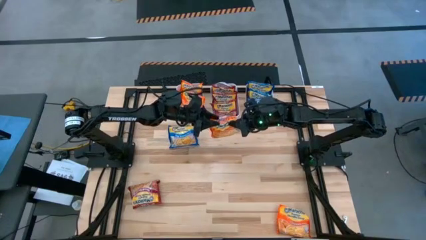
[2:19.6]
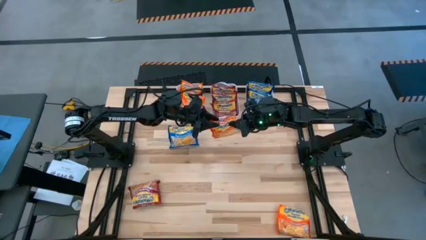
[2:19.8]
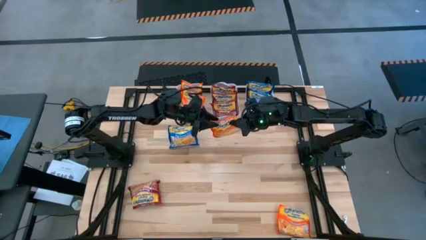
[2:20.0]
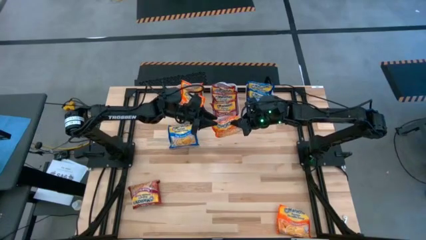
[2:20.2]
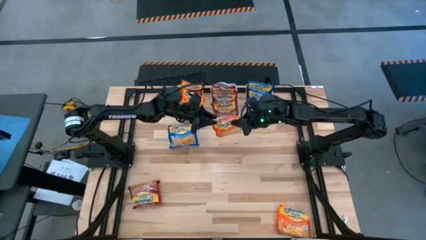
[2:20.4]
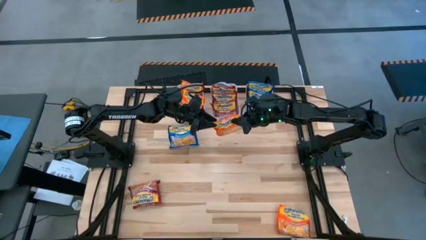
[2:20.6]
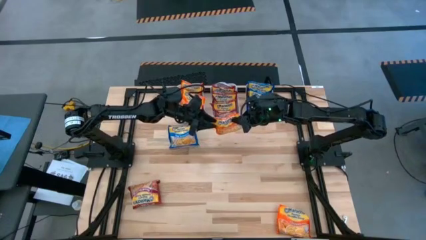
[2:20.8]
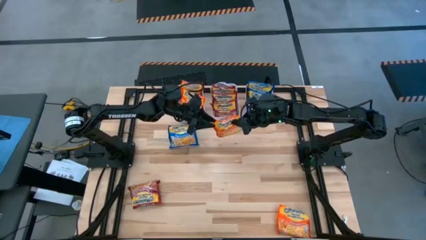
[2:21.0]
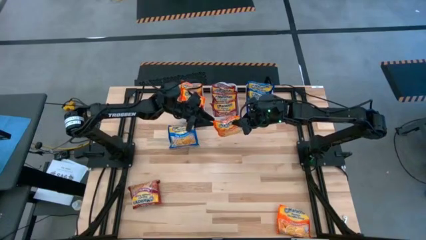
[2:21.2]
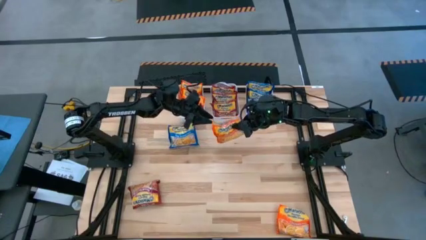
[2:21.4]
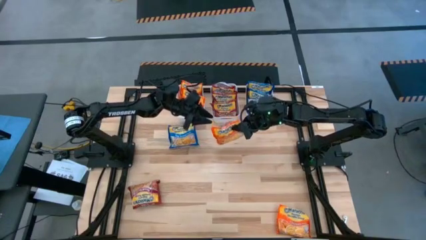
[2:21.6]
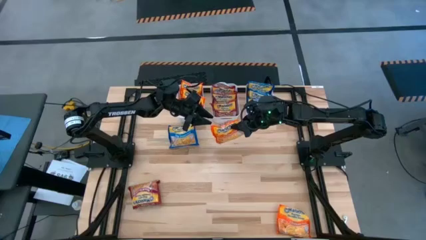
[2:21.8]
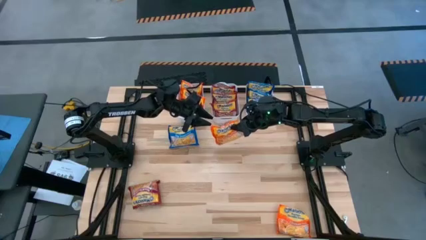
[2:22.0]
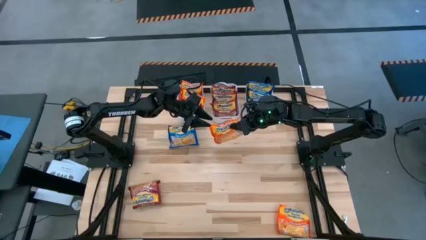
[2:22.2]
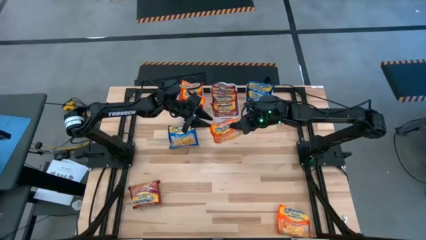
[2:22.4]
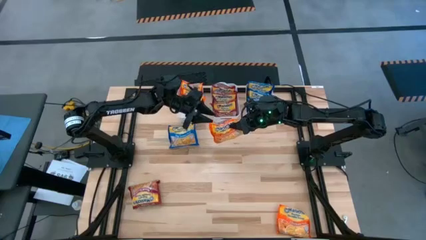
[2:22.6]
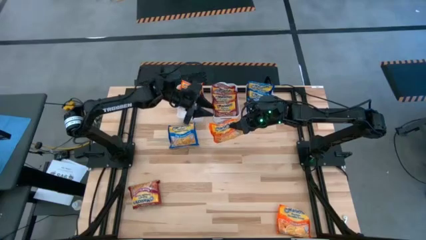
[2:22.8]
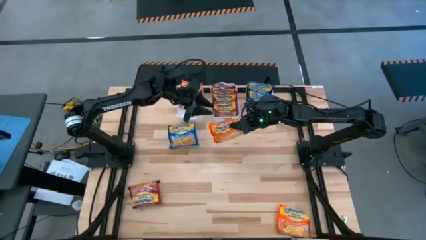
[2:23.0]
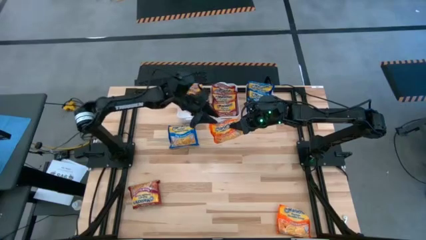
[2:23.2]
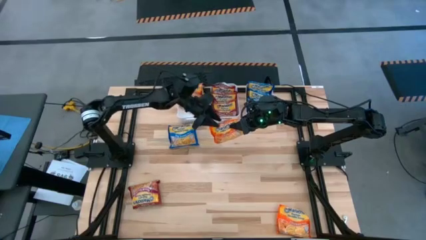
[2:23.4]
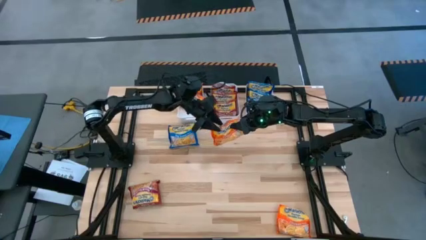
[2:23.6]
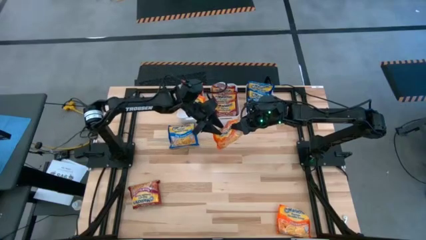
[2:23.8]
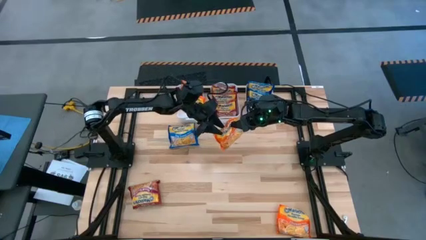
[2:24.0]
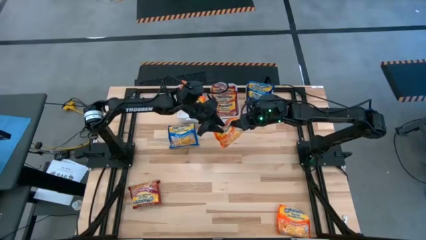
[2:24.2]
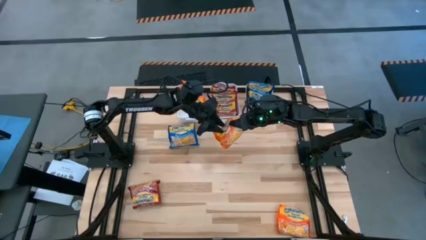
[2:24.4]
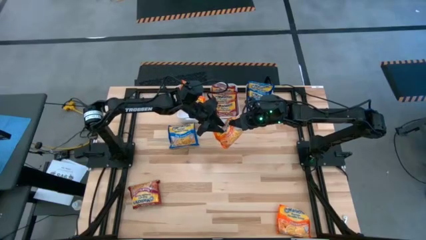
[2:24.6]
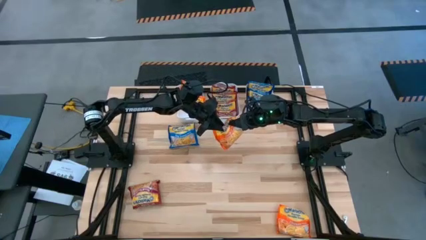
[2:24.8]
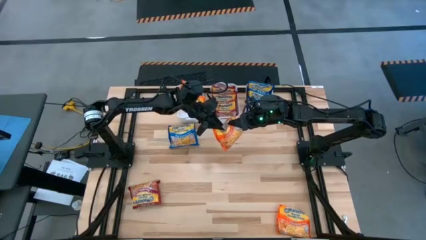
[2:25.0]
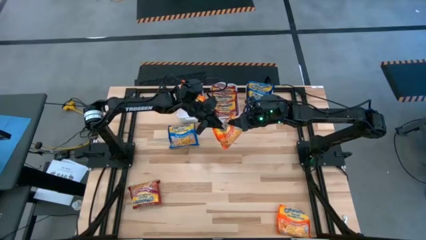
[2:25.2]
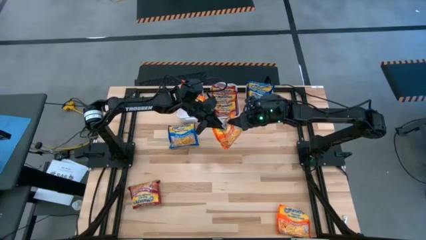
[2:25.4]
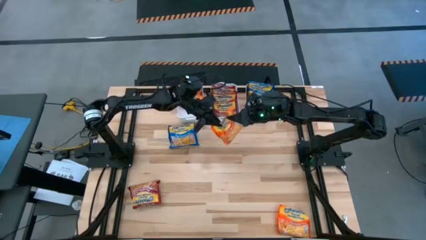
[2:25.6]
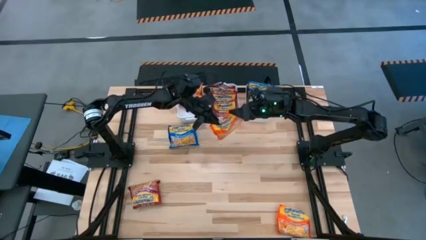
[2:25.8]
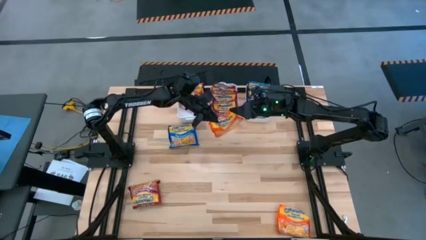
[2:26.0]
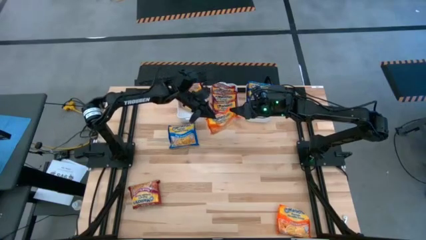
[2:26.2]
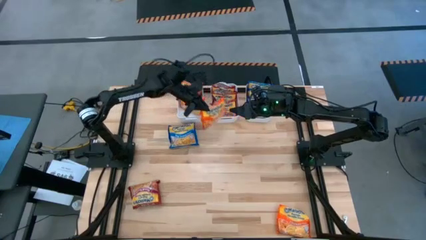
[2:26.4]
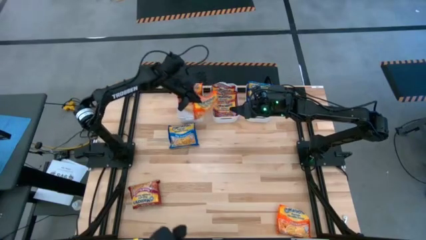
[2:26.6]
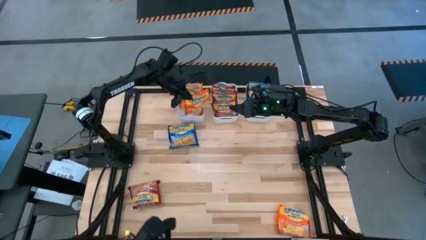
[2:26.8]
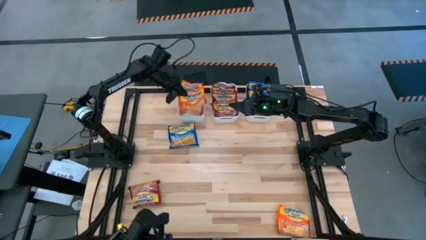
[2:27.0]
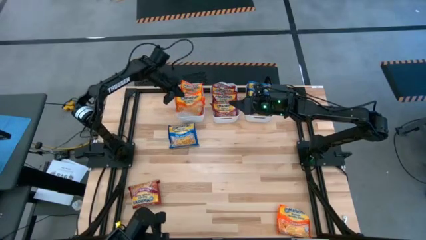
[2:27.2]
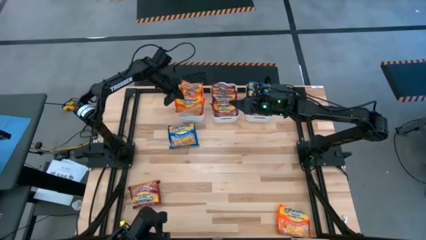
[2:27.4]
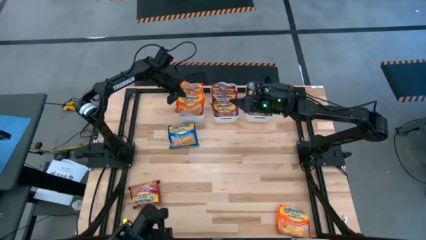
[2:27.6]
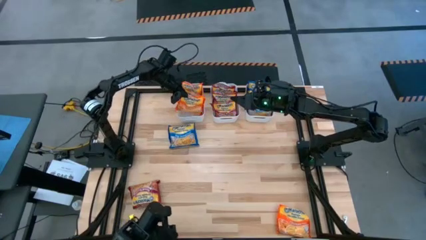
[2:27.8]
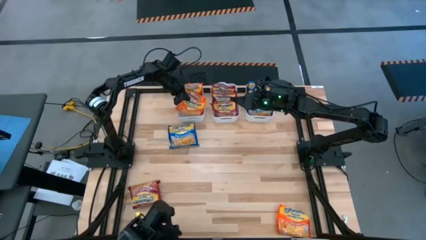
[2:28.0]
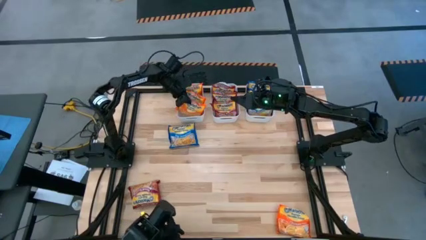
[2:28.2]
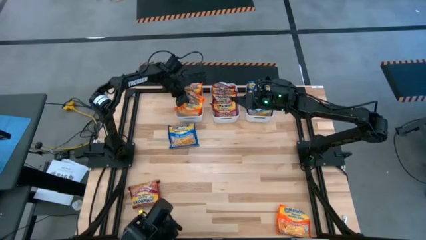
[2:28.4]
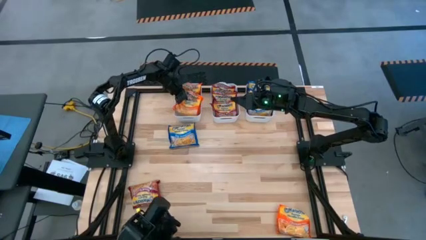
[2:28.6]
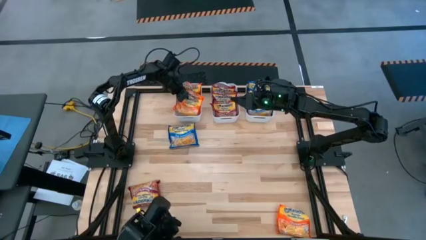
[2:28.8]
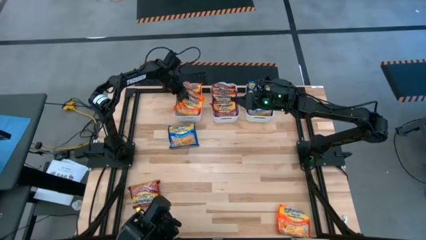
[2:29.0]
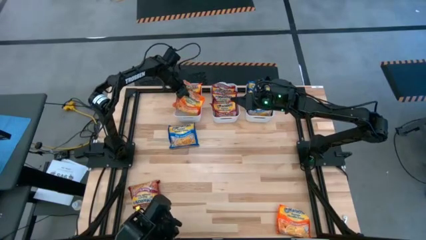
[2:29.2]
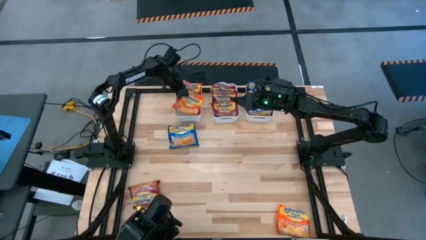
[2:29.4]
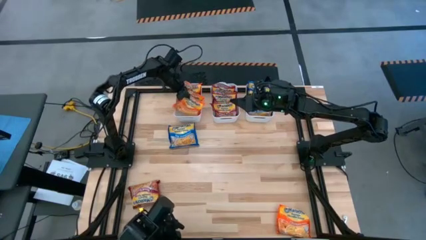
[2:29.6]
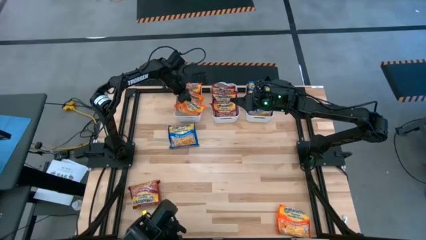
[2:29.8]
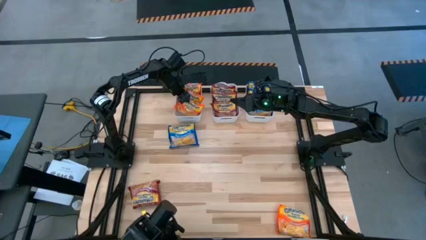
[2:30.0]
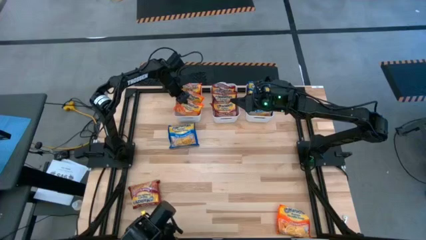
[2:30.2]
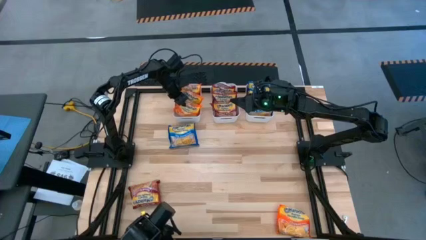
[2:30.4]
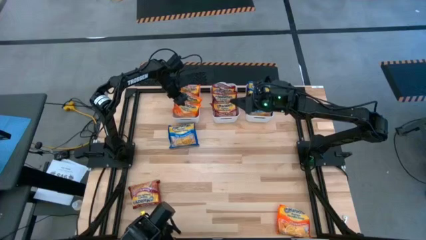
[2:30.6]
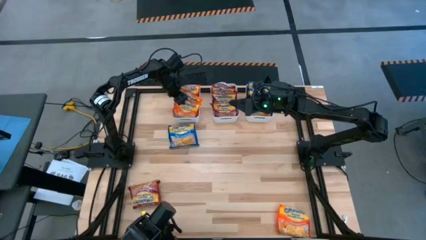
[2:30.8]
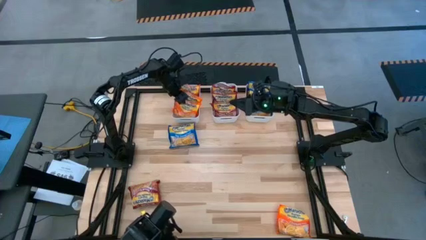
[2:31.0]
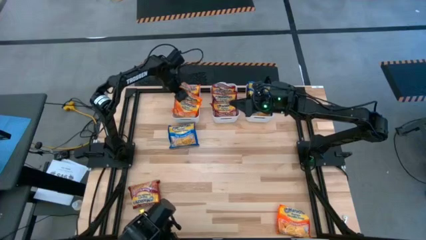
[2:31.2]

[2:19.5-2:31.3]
Task: Sort Maruchan noodles
Put the orange noodle pack into the left white bin

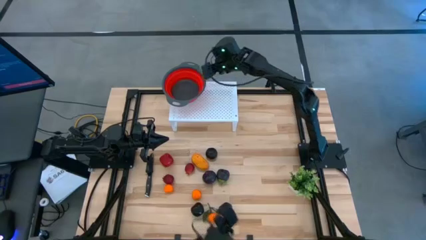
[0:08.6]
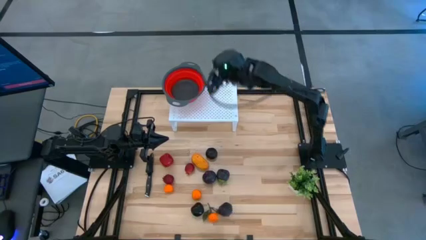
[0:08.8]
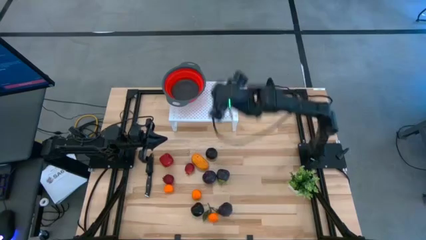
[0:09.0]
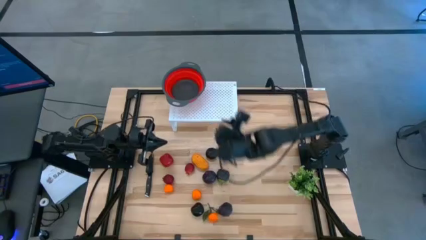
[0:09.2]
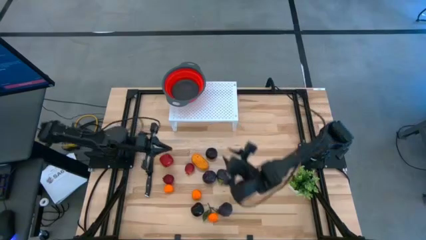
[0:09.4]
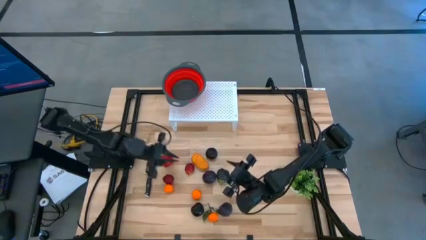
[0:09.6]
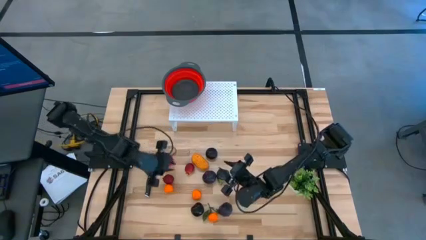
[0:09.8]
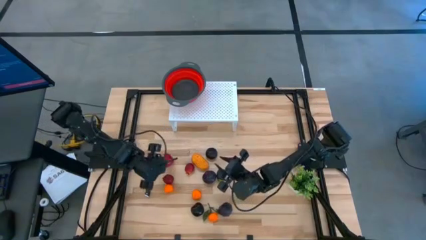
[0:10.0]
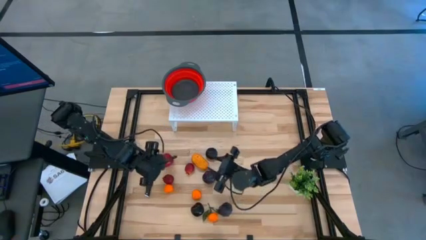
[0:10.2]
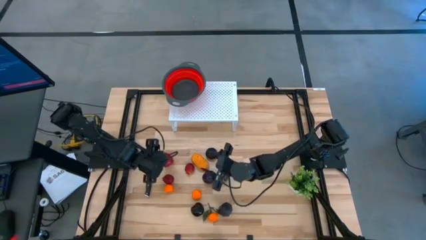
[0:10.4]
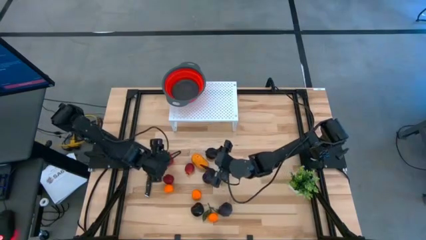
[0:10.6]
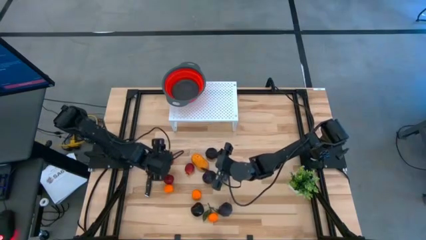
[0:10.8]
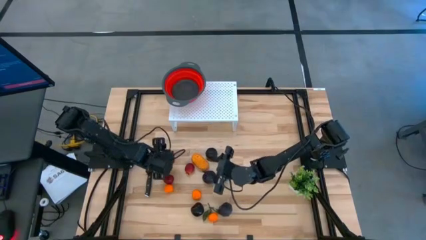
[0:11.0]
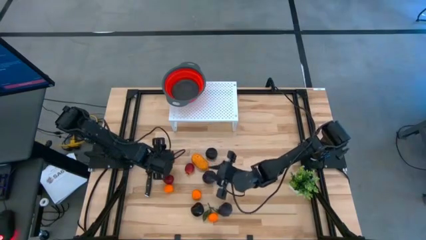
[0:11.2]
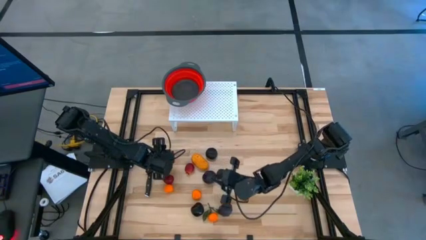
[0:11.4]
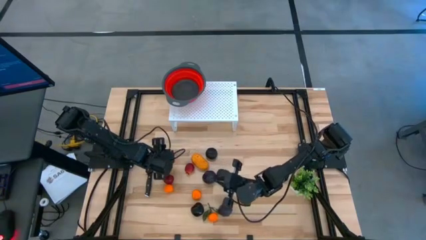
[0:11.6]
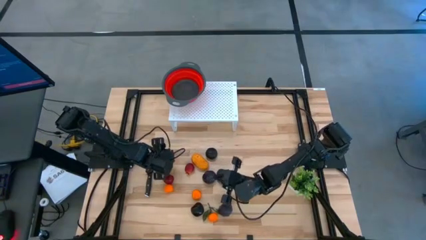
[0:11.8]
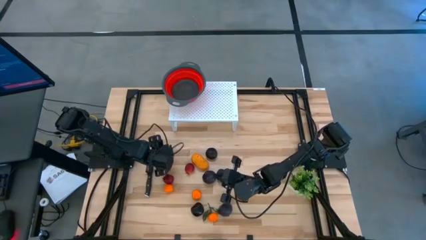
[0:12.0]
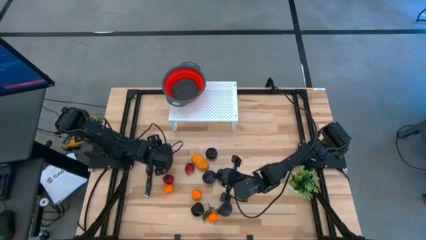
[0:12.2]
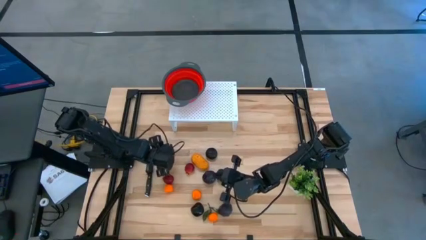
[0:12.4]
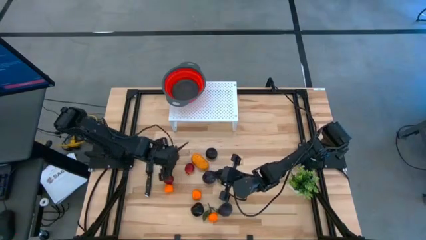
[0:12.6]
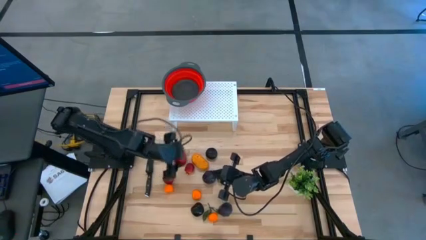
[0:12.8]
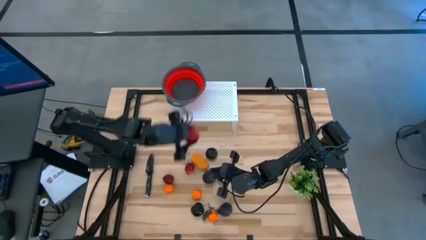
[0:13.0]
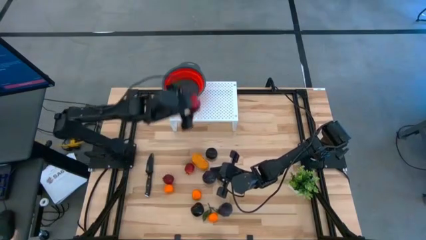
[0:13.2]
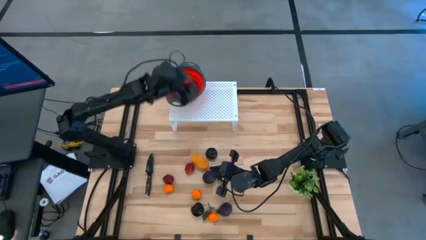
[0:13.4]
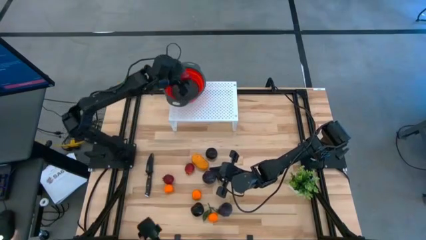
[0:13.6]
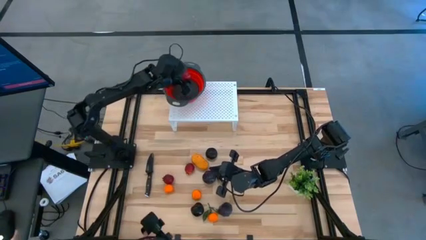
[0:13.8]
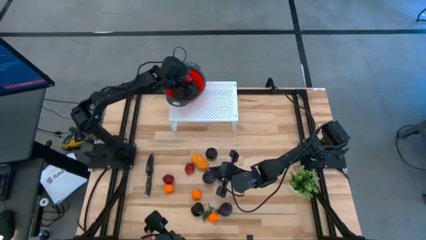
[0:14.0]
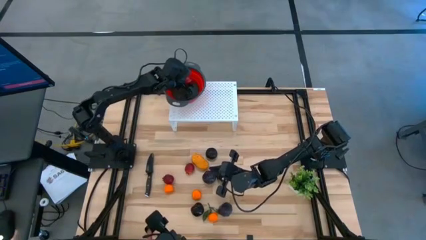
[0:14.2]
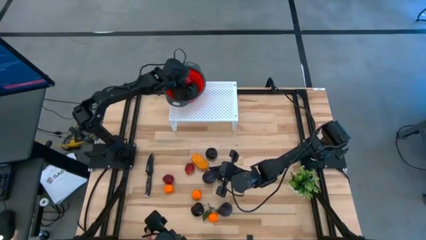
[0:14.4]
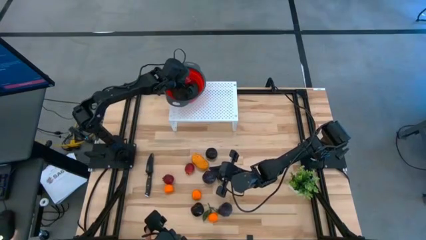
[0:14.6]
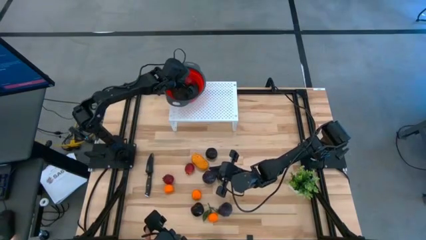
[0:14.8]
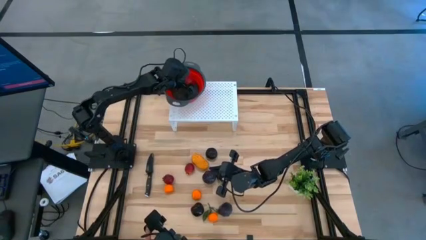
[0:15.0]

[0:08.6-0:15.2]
Task: Pick & Place Fruit
Put the red apple into the red strainer bowl on the shelf
